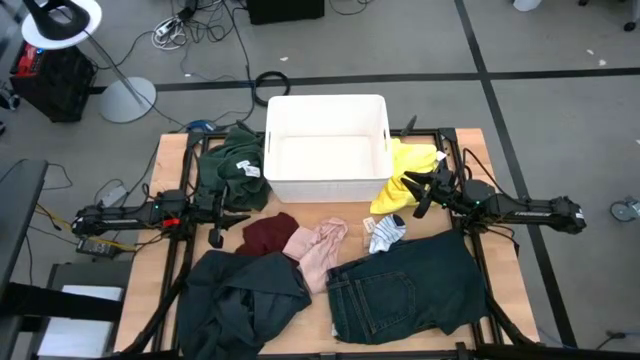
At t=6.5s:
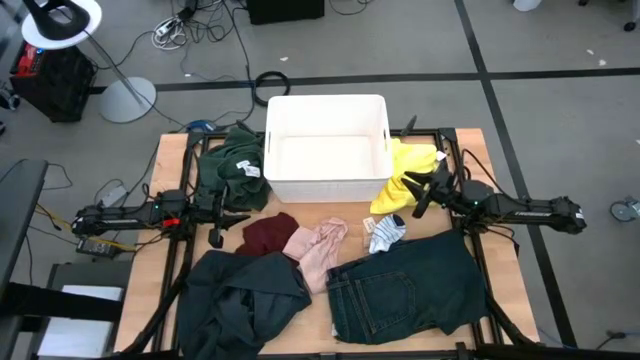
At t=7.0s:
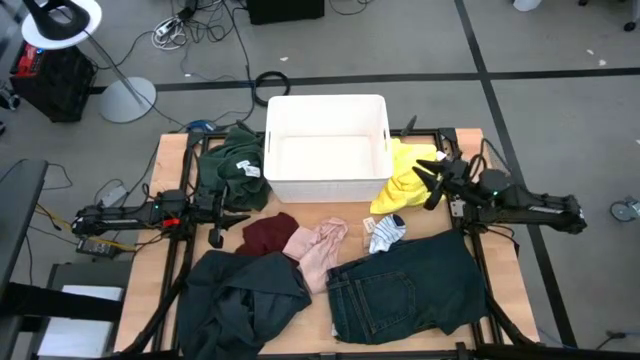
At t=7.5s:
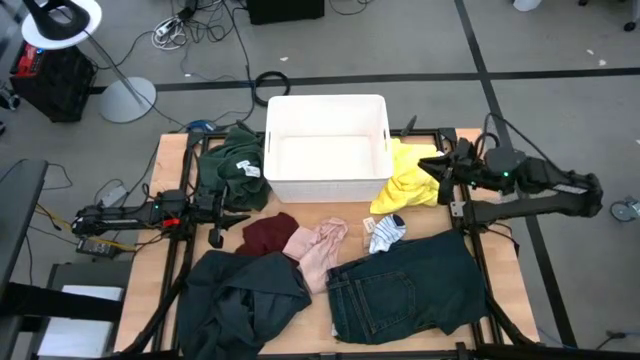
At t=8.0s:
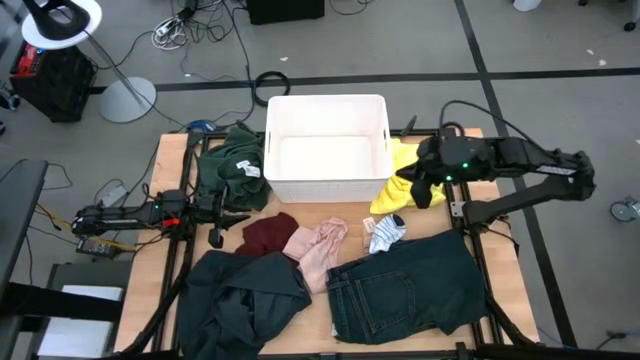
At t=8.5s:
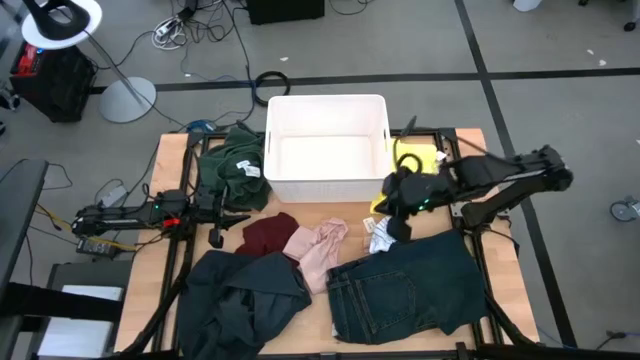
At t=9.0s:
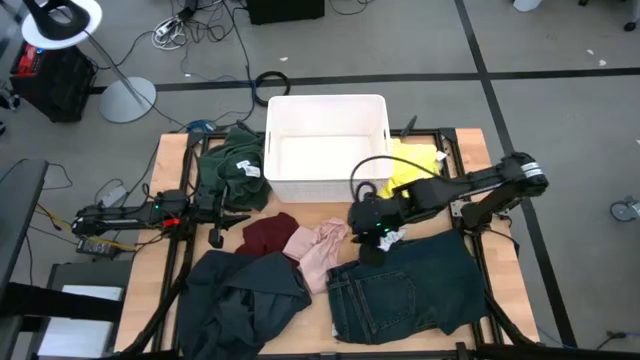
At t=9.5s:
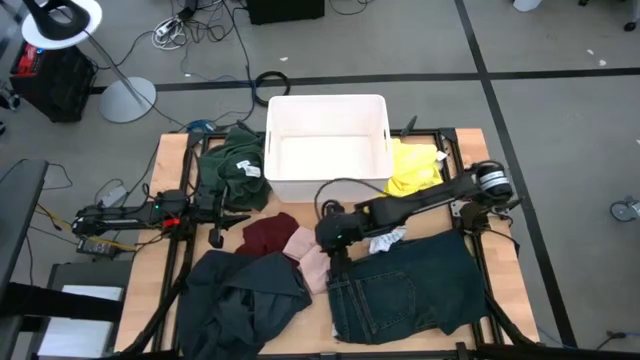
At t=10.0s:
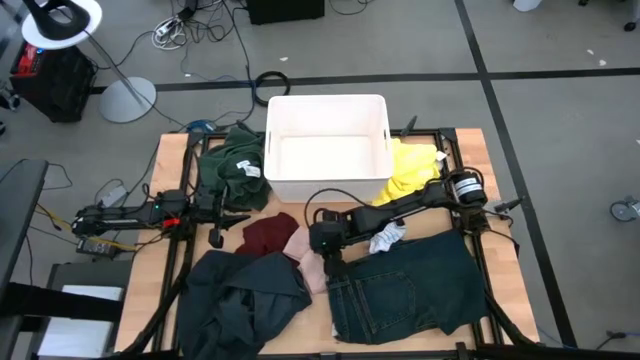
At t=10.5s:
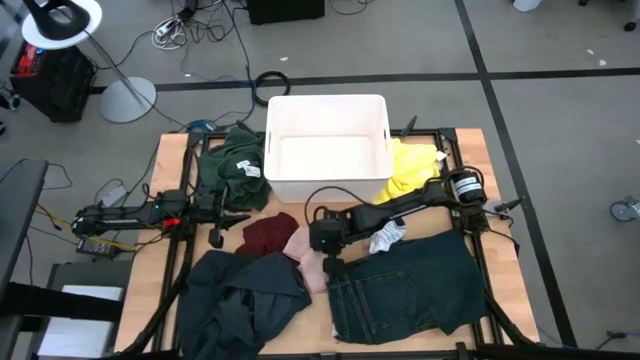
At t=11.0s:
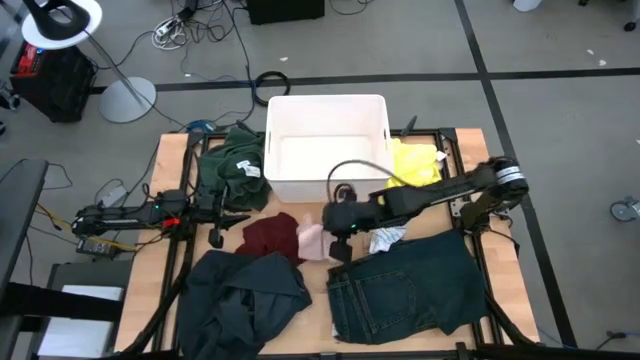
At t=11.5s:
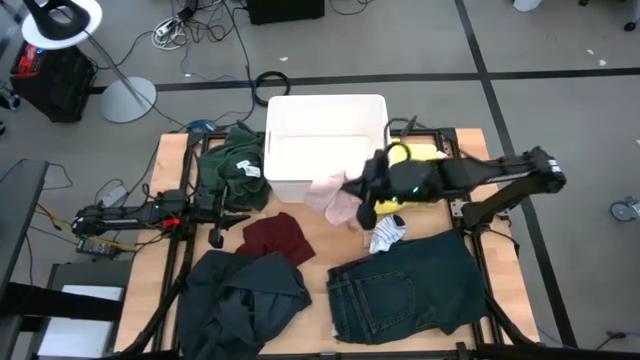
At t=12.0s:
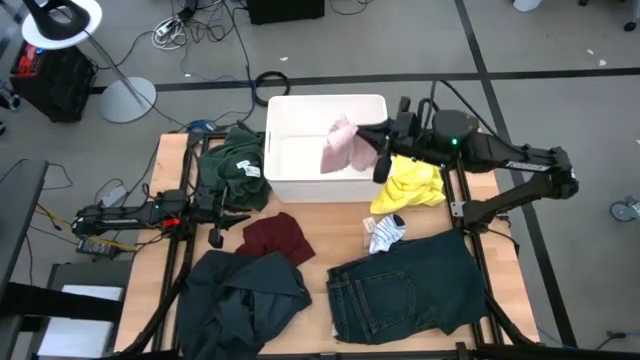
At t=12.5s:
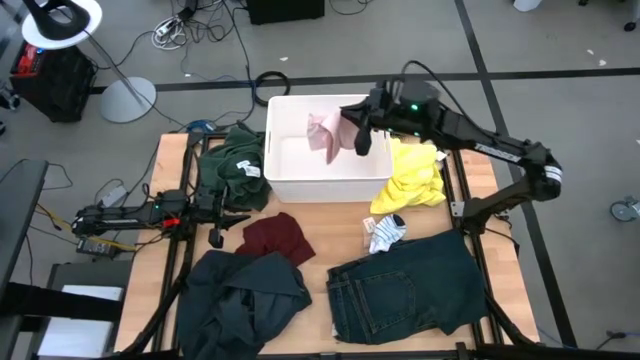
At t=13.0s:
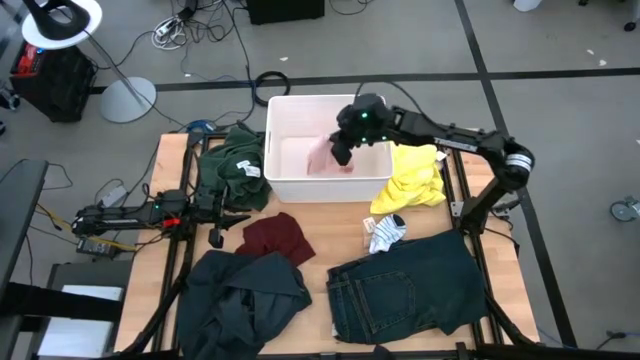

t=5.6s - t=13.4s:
Task: Sort clothes
Put the pink underwear into the white bin

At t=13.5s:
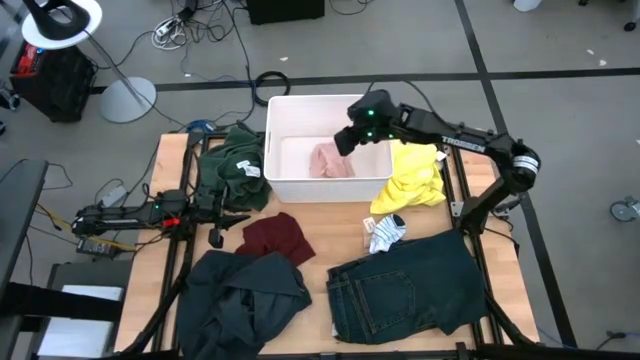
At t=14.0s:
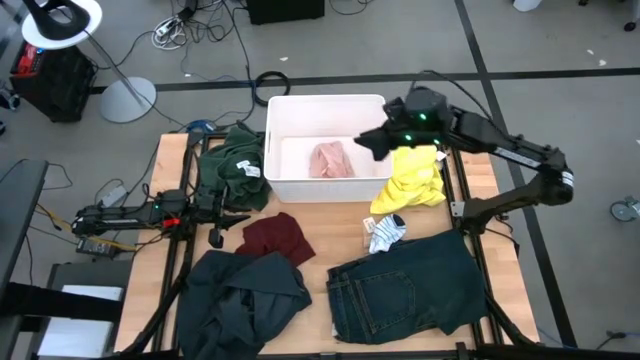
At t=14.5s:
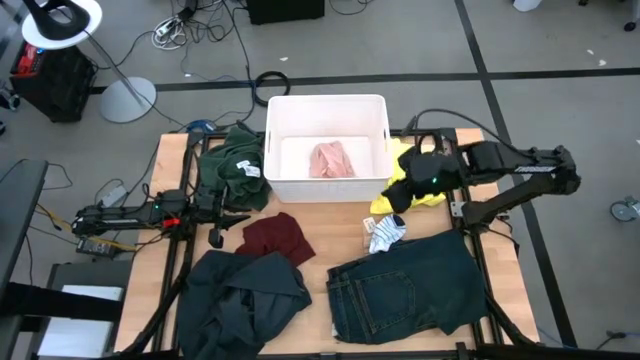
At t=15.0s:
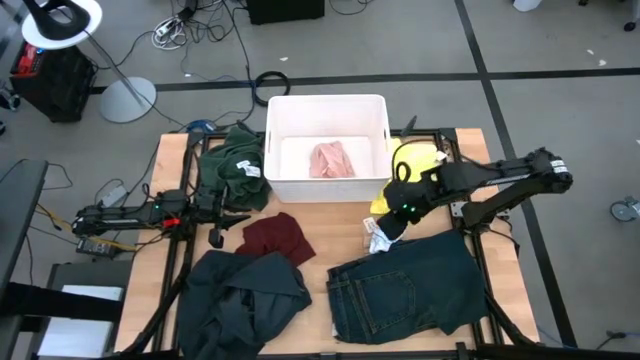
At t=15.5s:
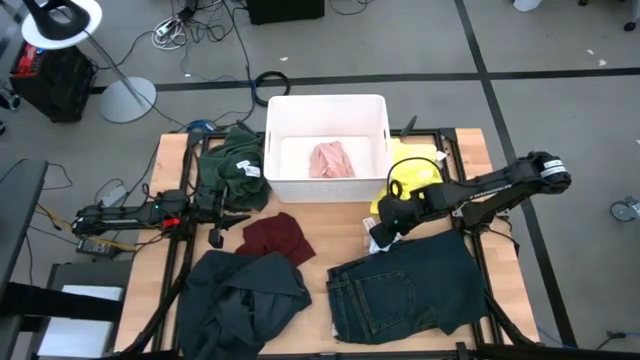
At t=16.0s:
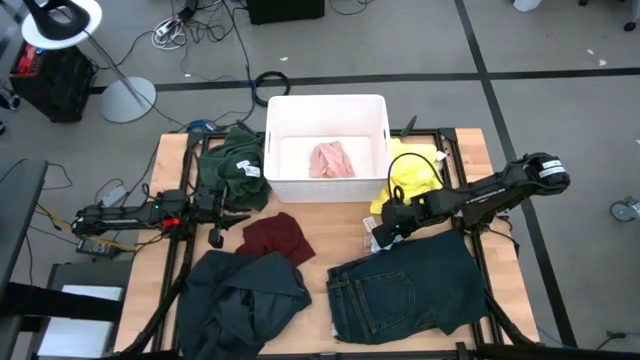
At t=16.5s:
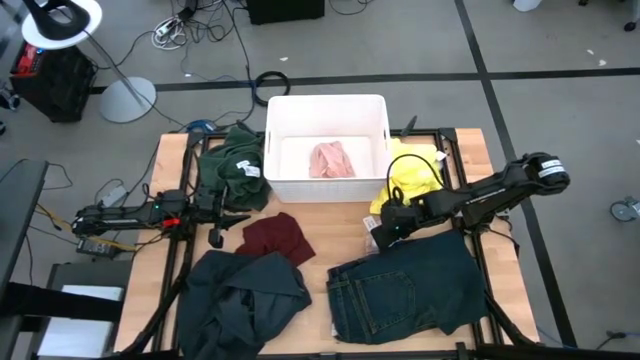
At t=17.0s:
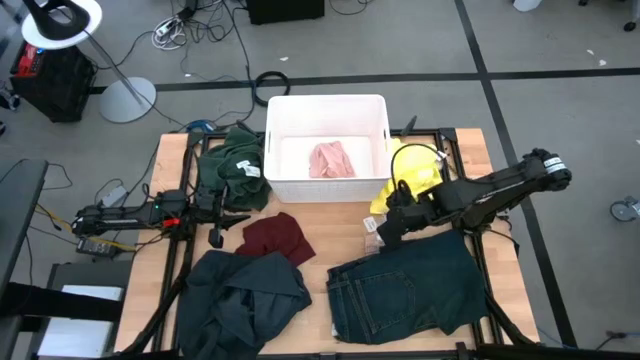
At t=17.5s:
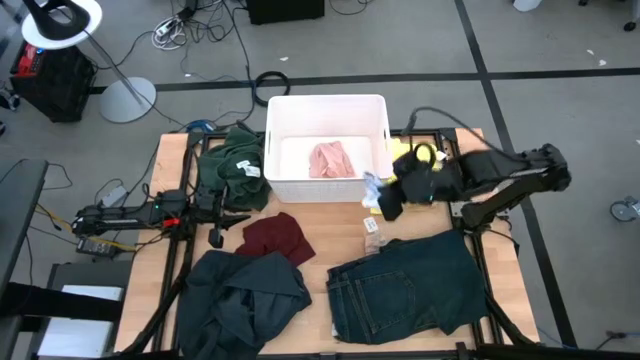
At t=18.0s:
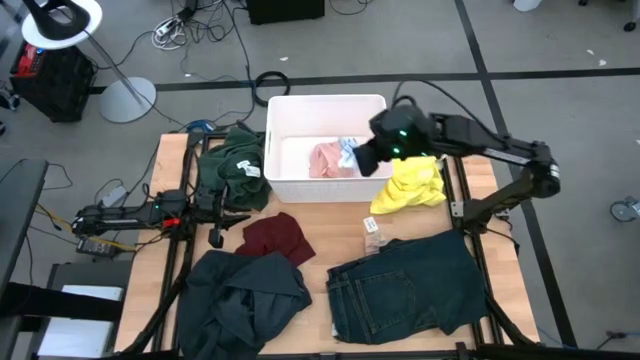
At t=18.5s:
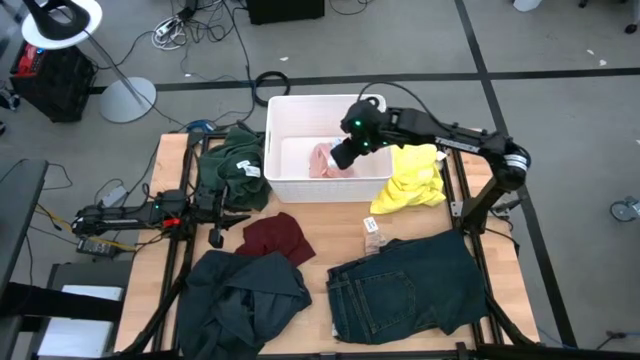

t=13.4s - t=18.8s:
Put the white sock into the white bin

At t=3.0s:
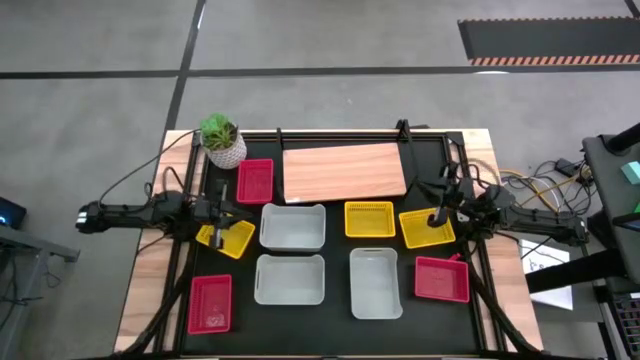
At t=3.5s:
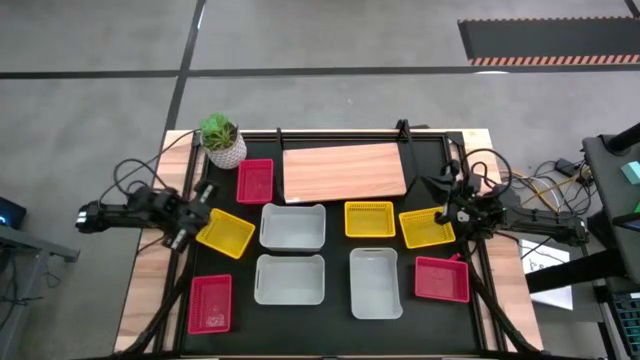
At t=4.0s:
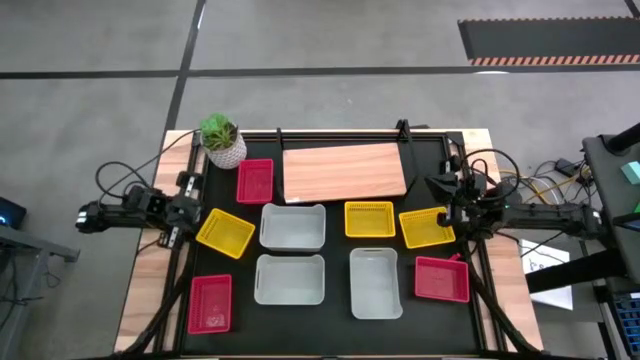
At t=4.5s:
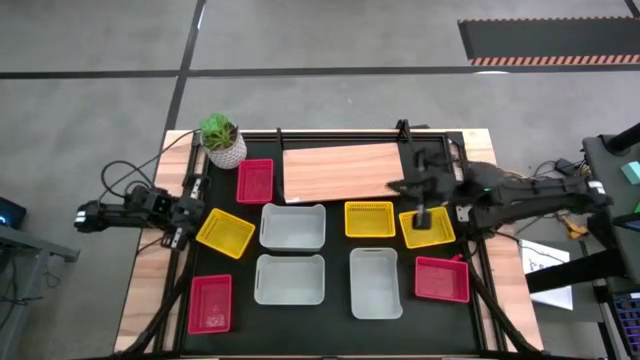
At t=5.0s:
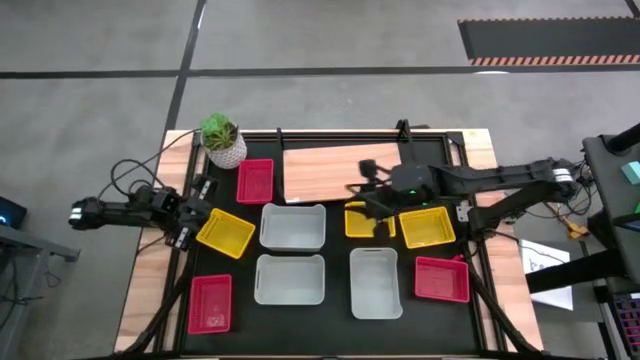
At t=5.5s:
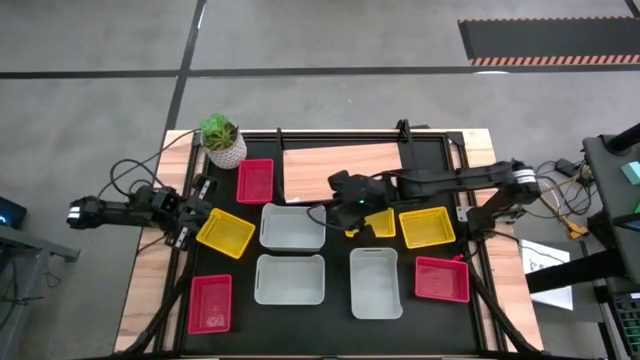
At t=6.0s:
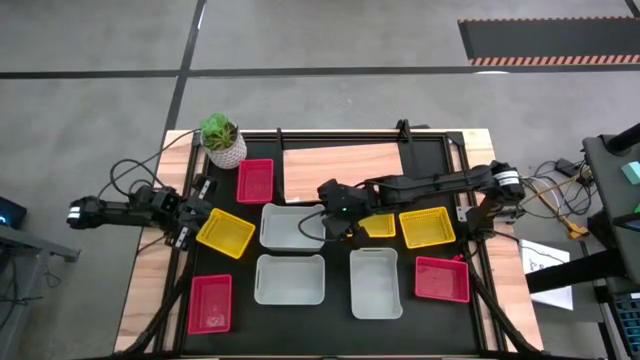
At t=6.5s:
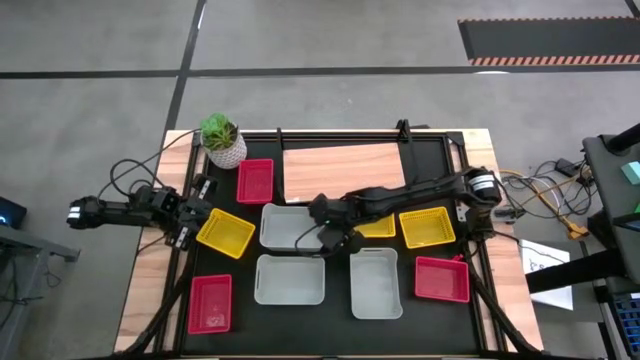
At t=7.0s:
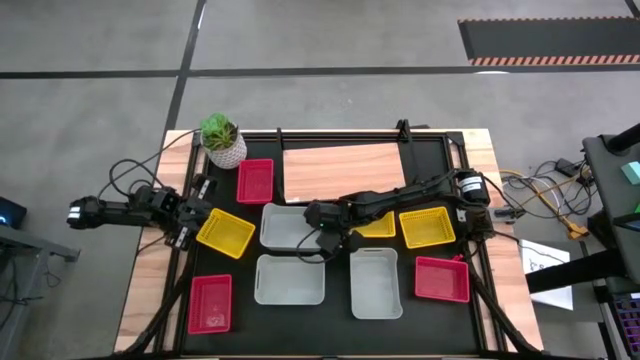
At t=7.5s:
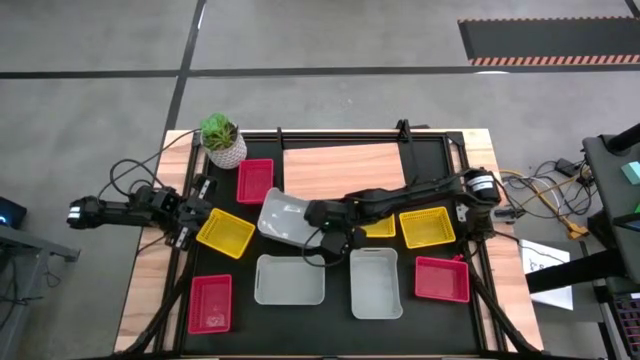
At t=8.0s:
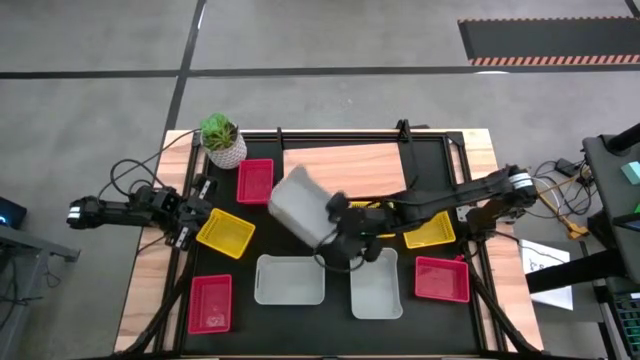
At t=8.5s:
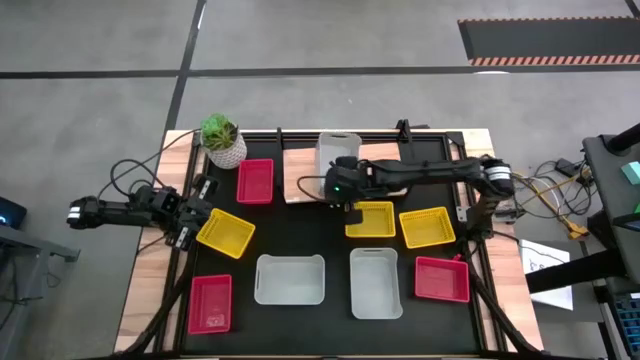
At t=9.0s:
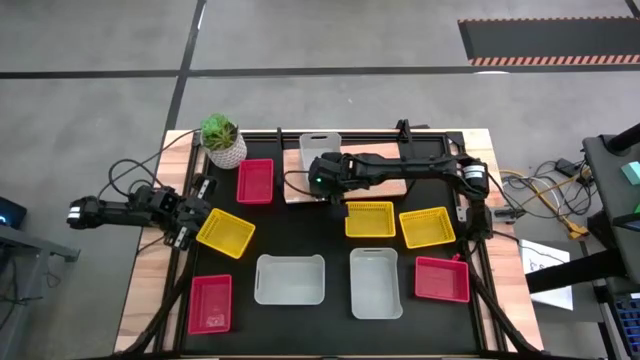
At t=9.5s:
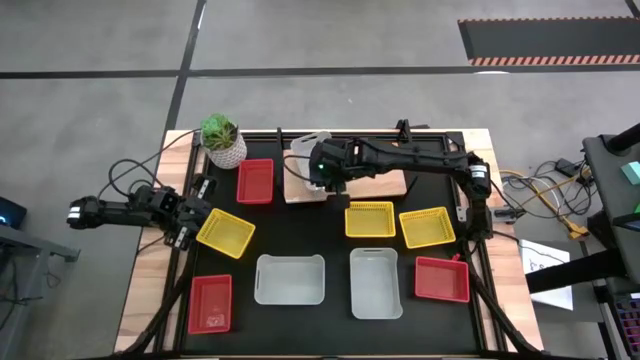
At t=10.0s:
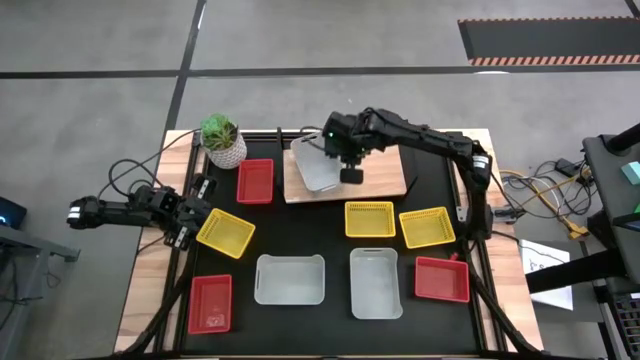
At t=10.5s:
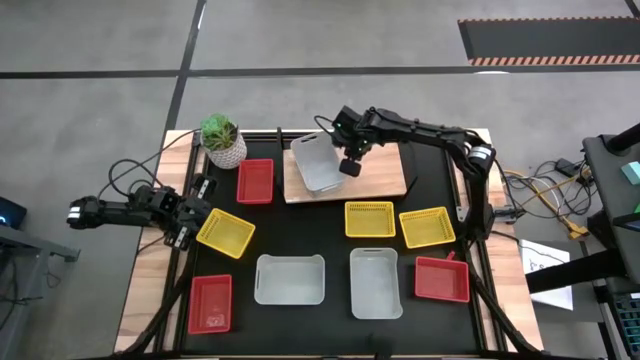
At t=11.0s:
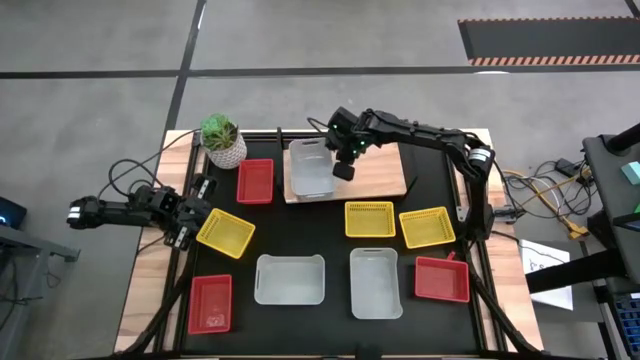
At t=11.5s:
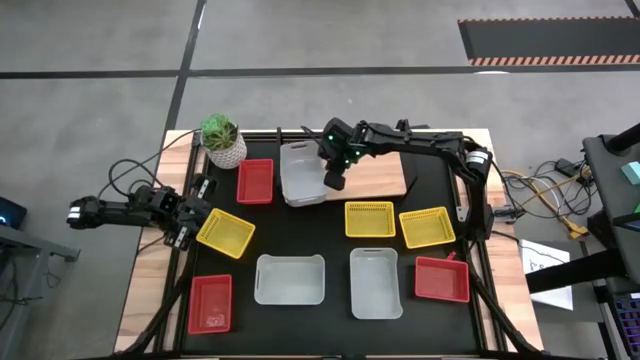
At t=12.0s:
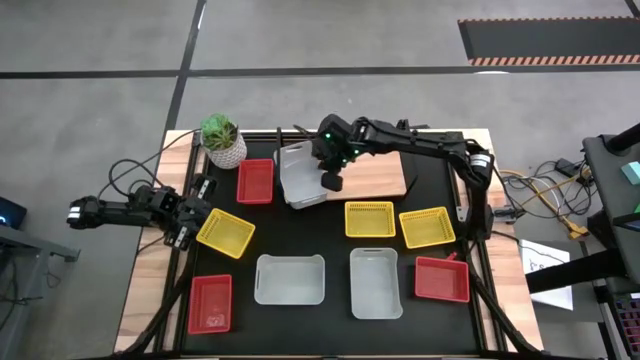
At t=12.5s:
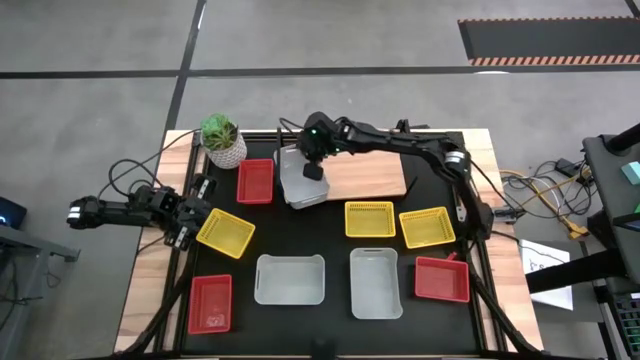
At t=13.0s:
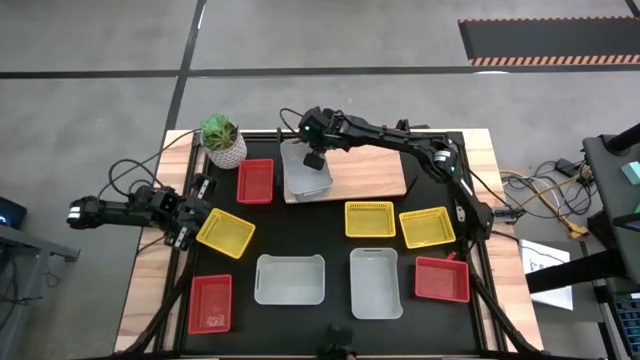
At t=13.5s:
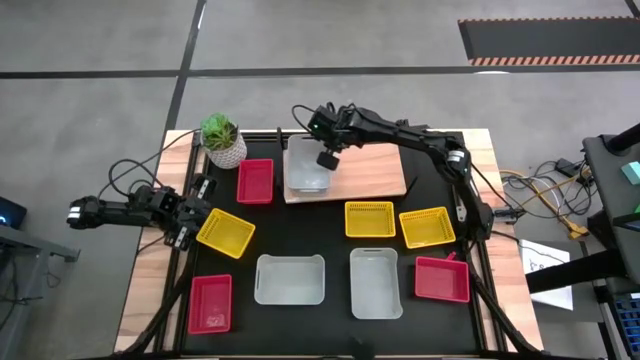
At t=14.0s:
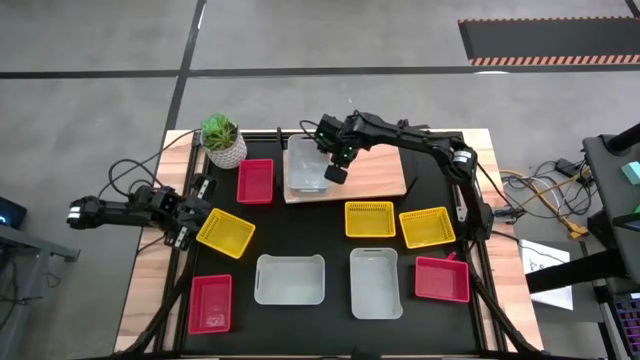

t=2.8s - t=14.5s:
Task: Stack baskets on shelf by color
Put the top gray bin on the shelf
